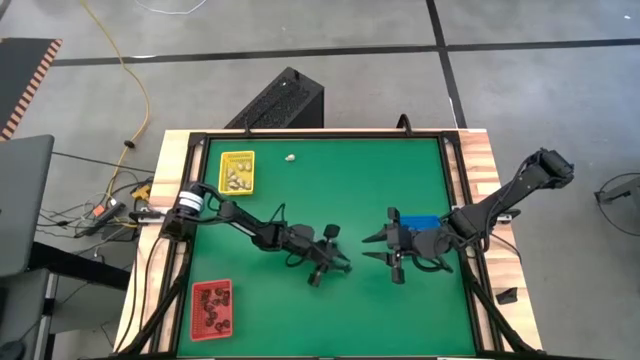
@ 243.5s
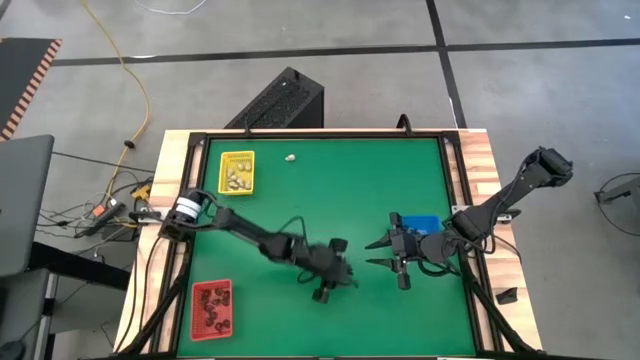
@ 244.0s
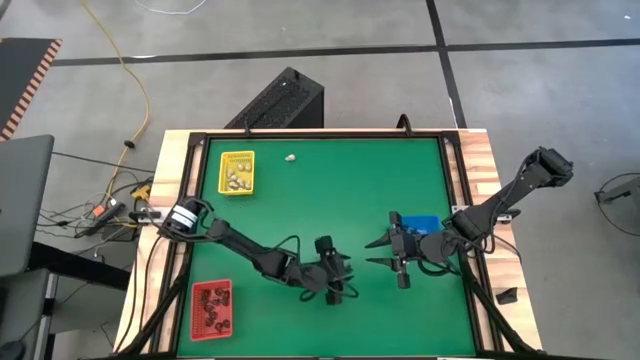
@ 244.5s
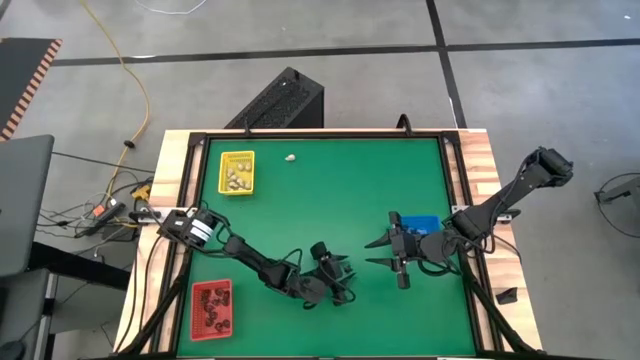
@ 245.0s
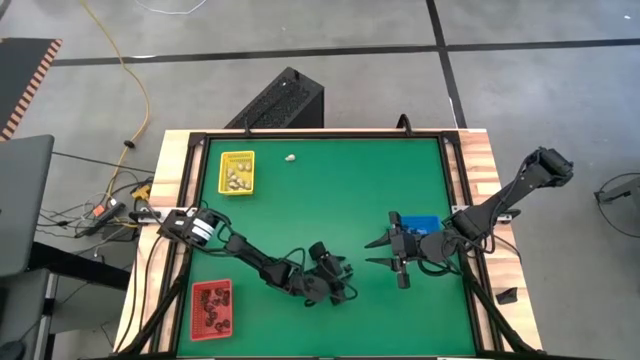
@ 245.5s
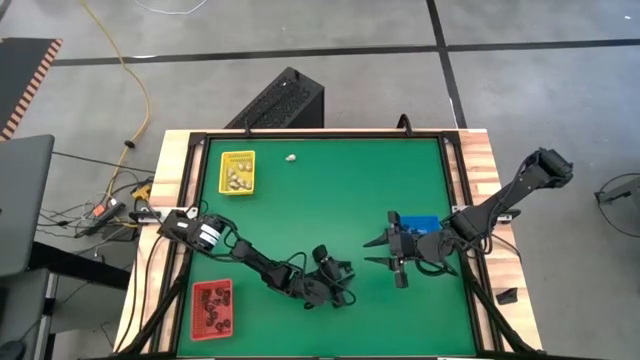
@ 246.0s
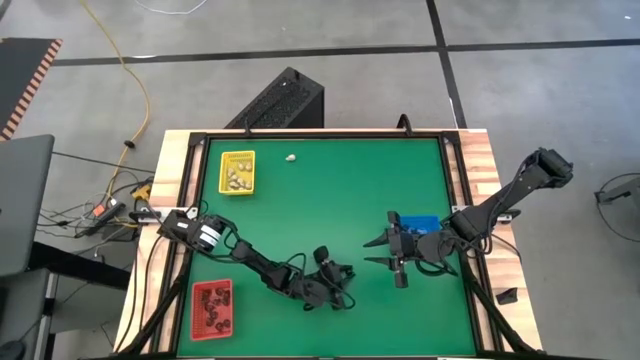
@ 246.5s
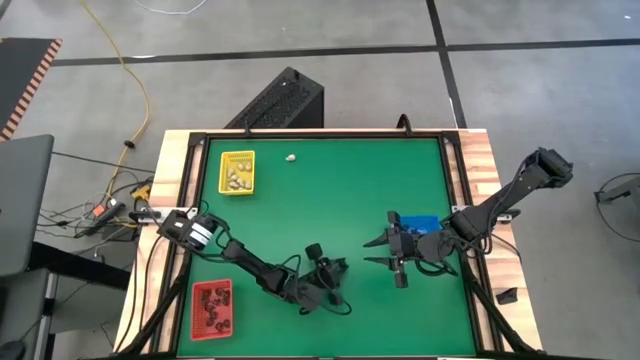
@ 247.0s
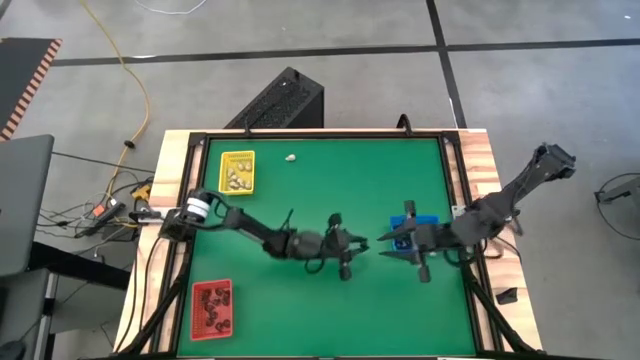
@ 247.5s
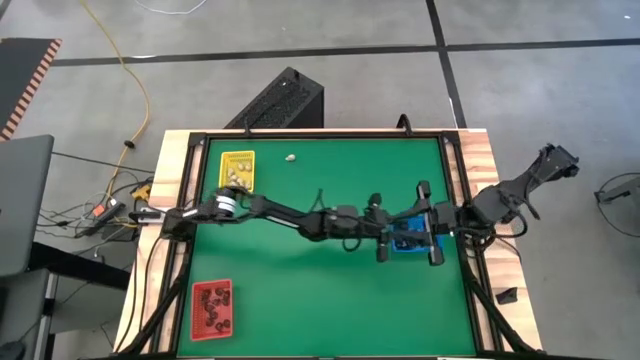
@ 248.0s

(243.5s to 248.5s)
Task: Sort Halloween decoration
Put the black spider toy into the blue bin

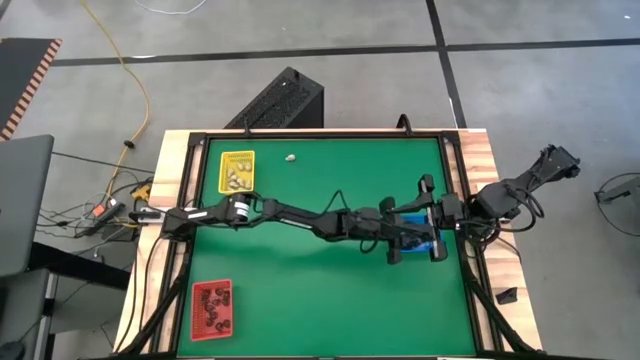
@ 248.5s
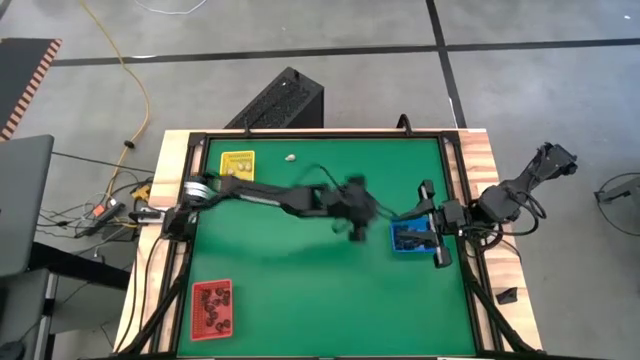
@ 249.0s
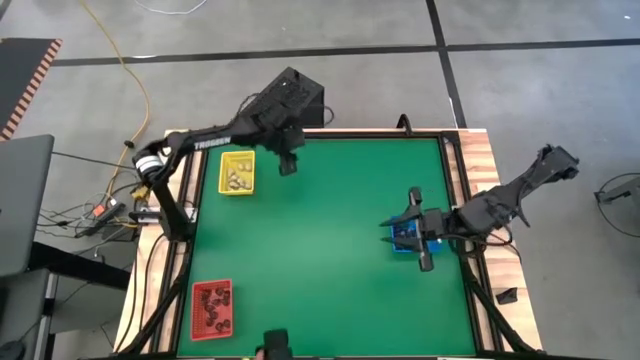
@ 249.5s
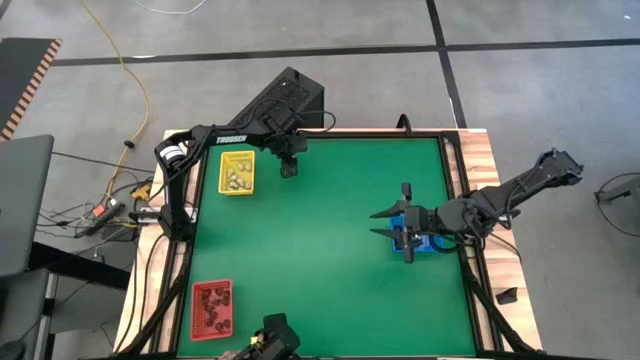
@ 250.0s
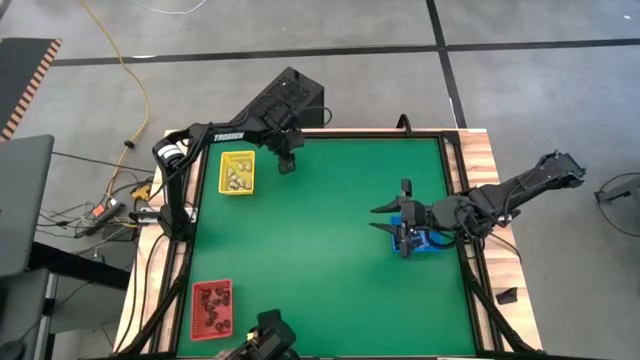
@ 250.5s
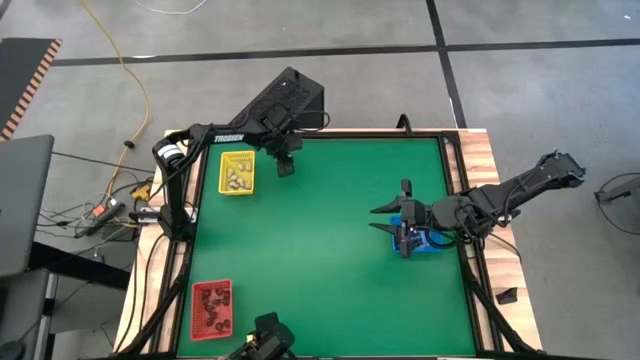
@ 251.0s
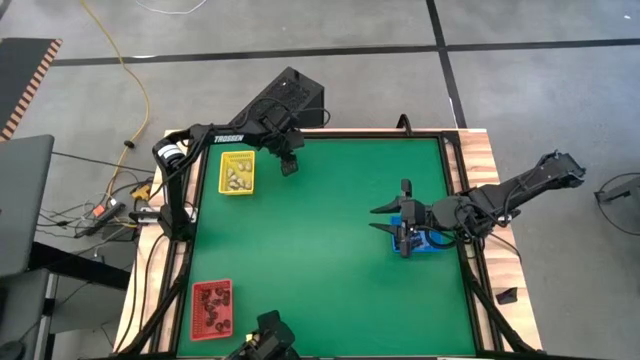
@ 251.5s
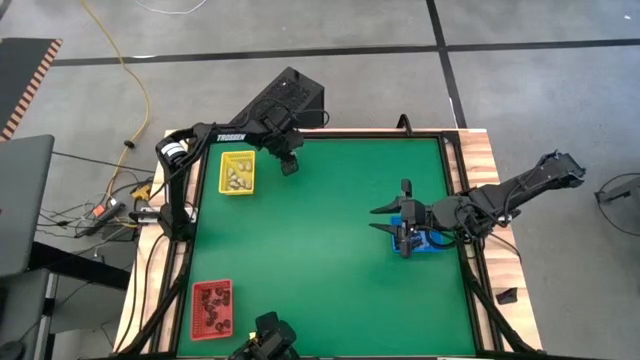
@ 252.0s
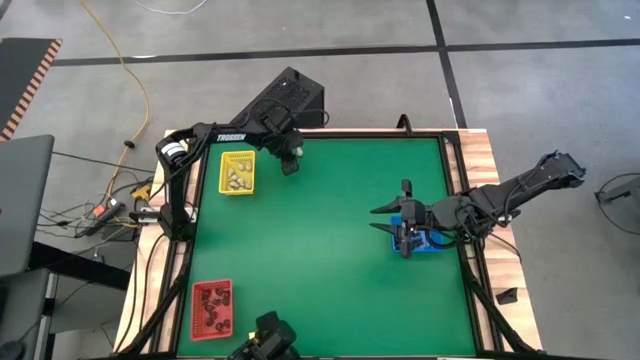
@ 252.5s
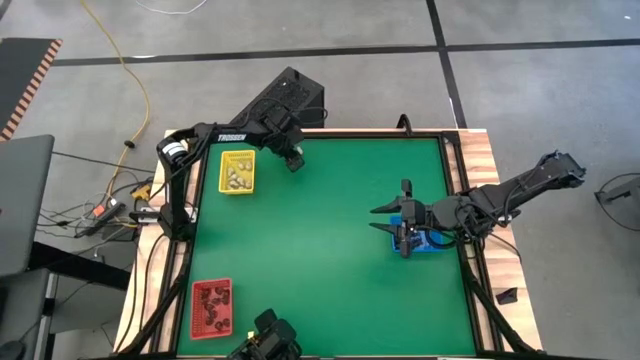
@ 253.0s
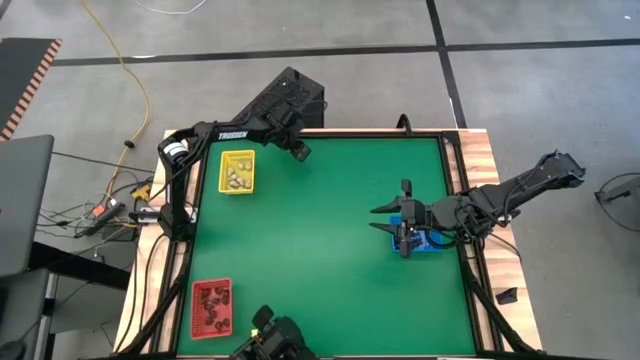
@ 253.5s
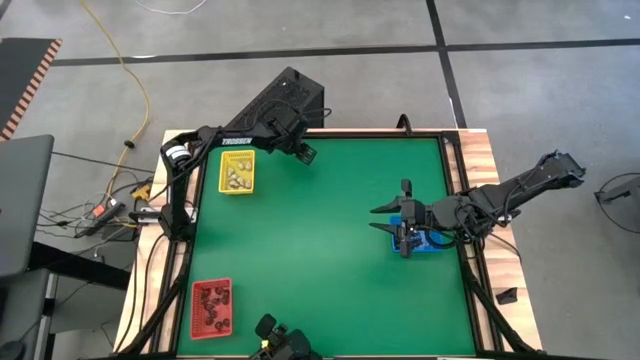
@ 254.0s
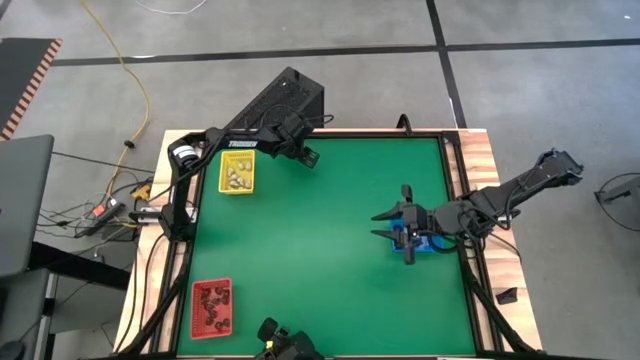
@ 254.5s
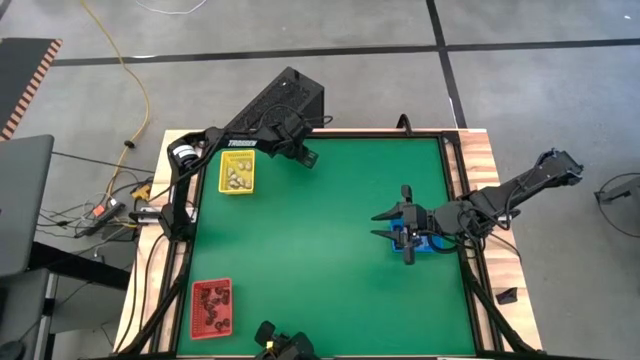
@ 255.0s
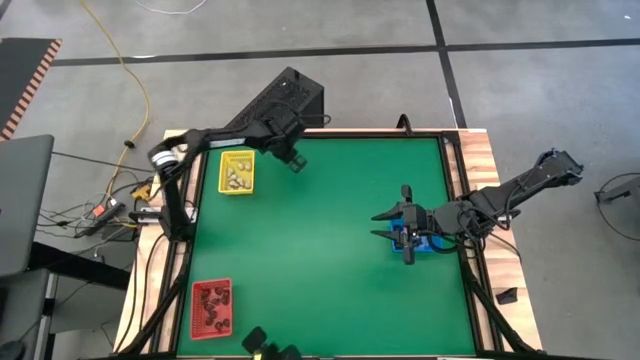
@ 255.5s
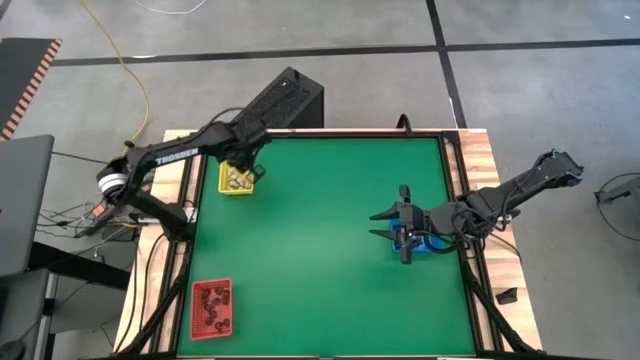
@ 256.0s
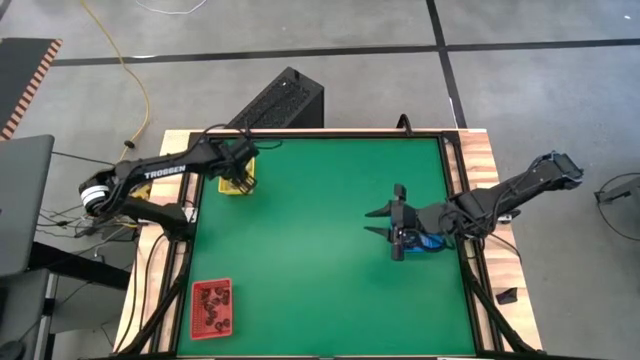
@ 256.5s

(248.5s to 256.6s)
Put the white skull toy into the yellow bin

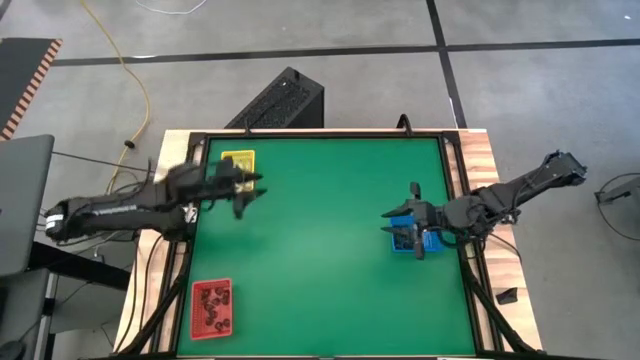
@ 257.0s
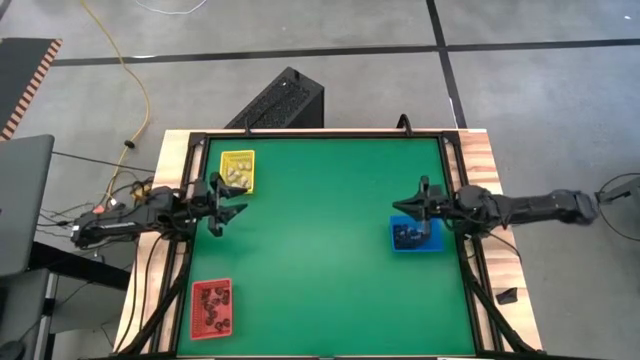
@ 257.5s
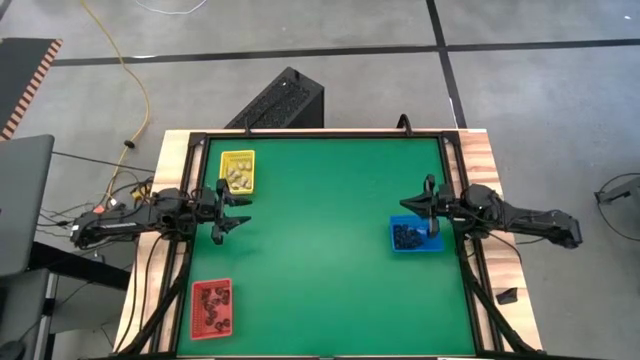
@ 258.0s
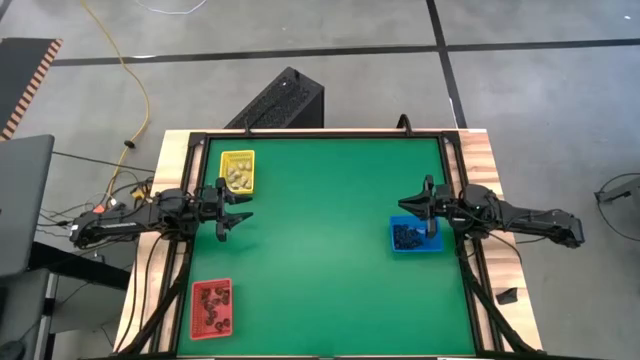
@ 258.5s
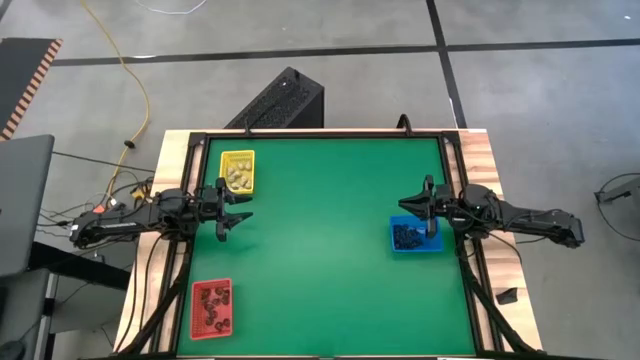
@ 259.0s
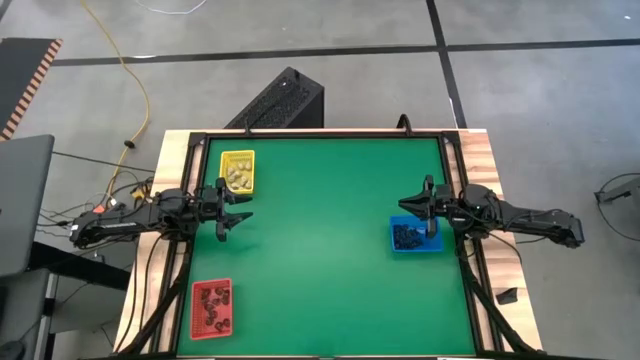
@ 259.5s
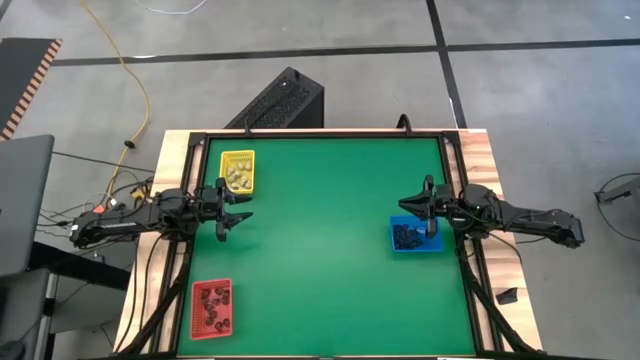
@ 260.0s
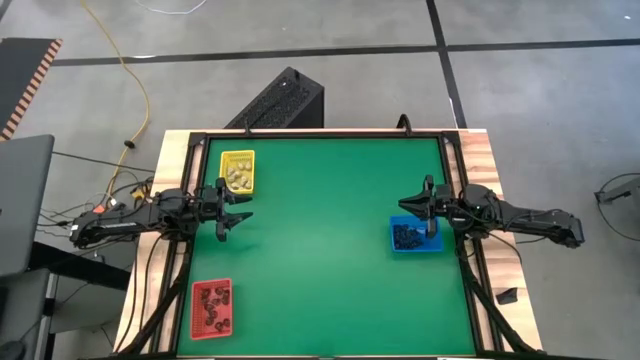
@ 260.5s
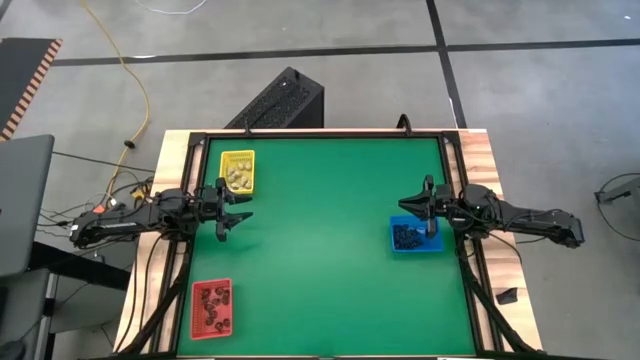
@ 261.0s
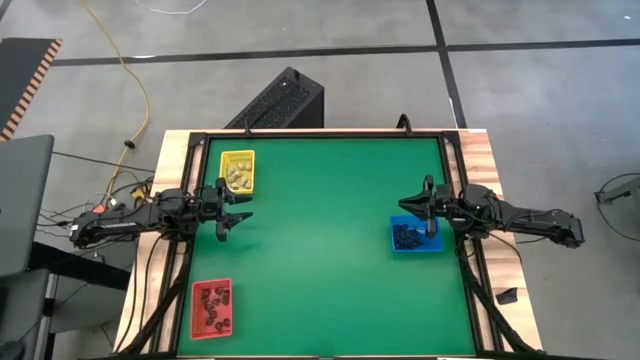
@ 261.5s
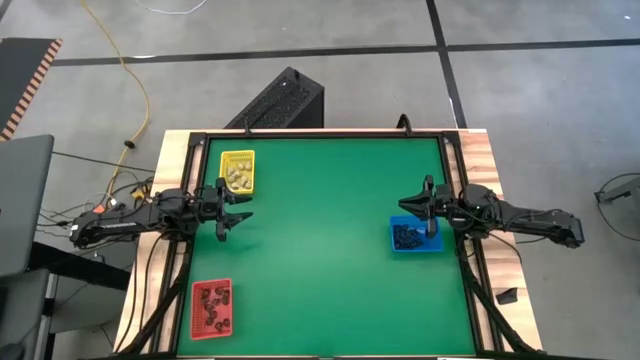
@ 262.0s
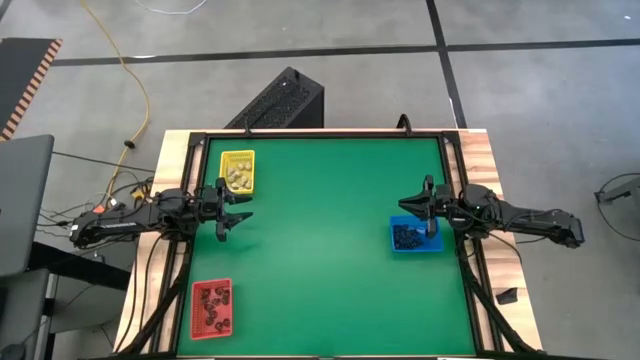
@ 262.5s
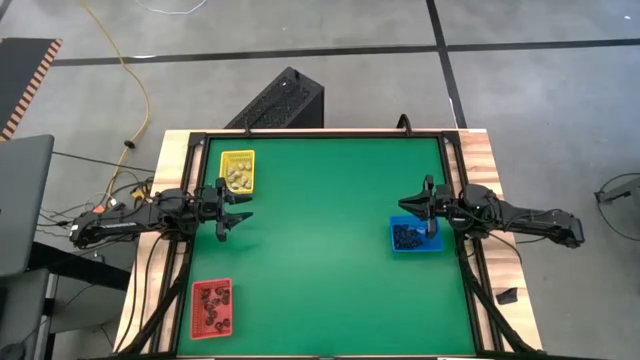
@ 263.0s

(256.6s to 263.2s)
Return to Home Position

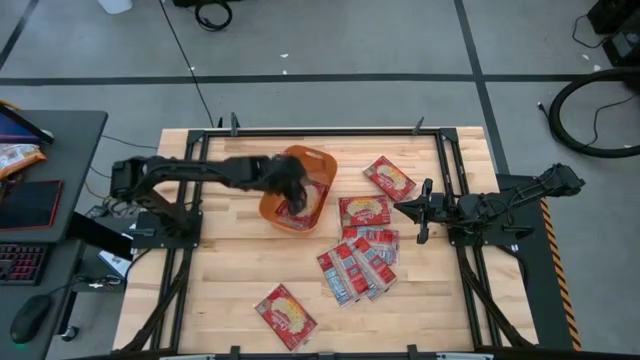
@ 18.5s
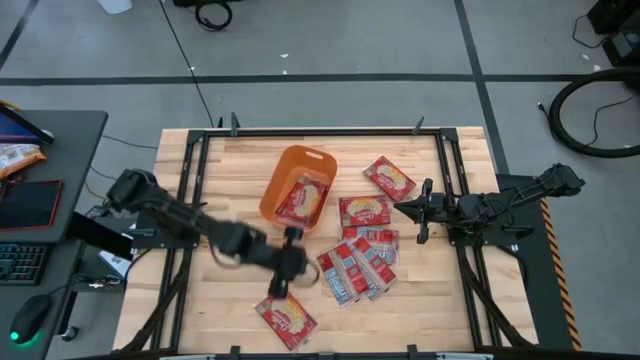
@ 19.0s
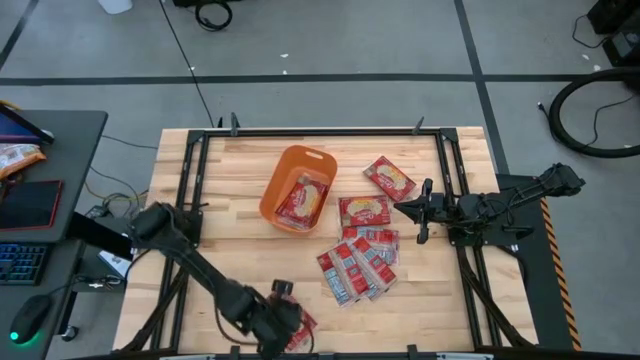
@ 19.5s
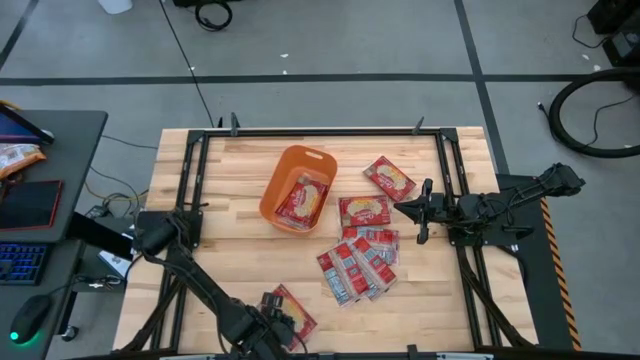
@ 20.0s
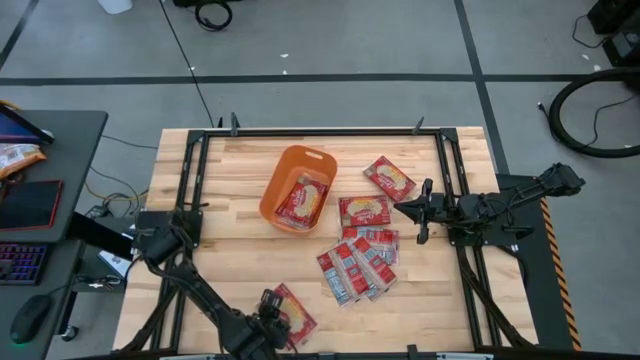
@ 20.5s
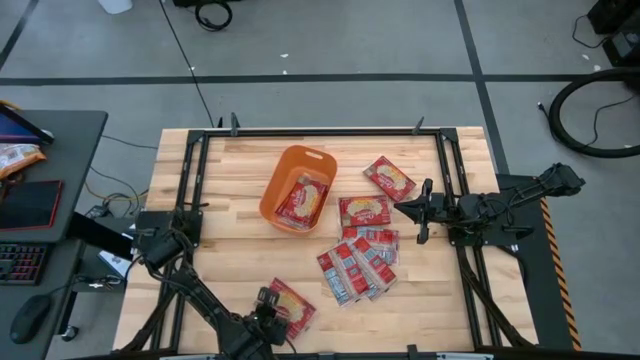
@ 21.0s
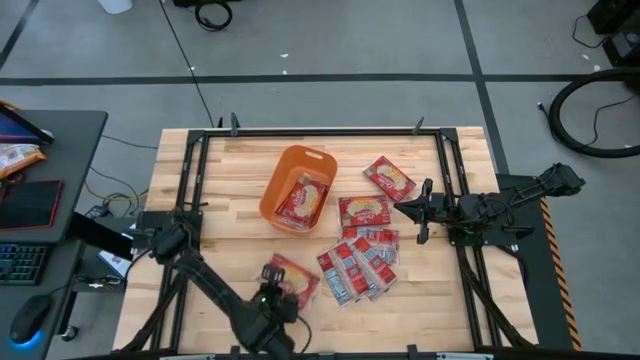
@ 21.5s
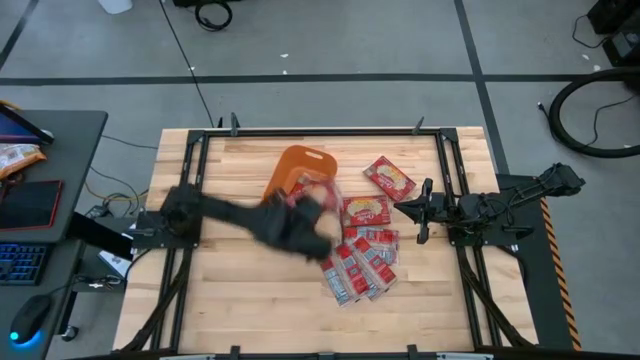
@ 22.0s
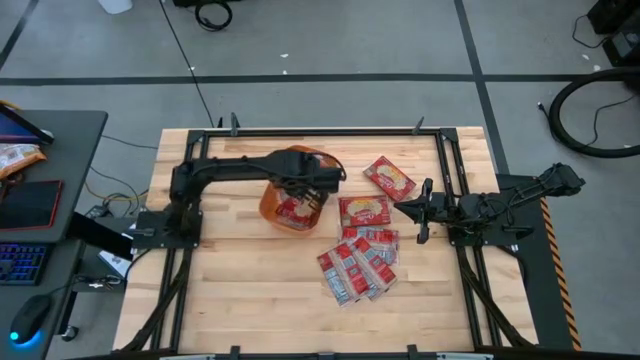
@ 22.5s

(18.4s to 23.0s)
Task: Sort popcorn bags into baskets
Put the red popcorn pack into the orange bin
